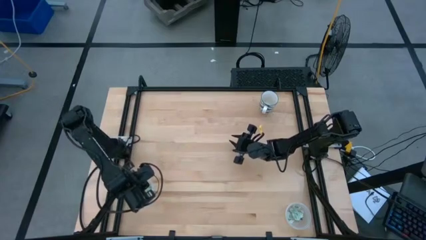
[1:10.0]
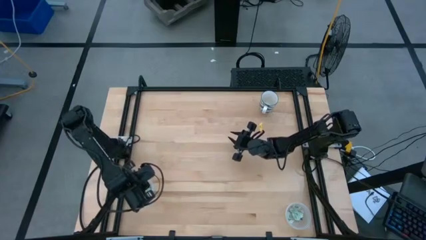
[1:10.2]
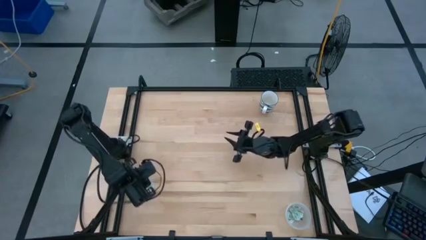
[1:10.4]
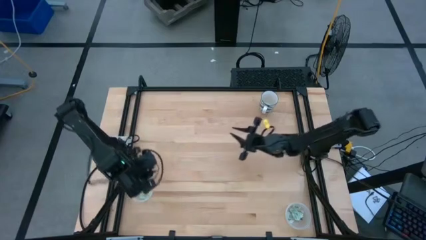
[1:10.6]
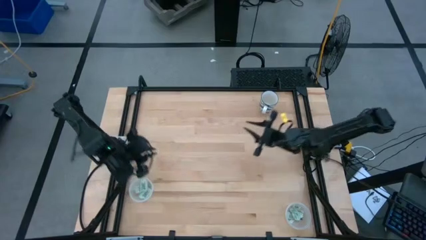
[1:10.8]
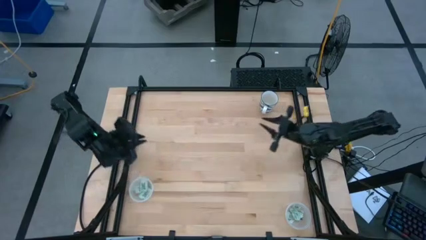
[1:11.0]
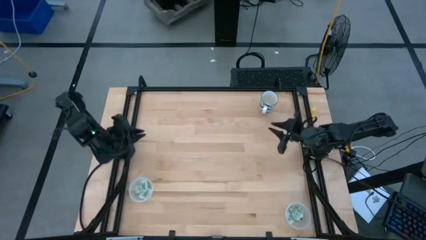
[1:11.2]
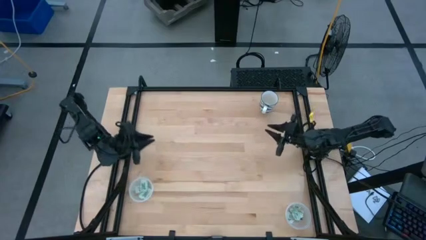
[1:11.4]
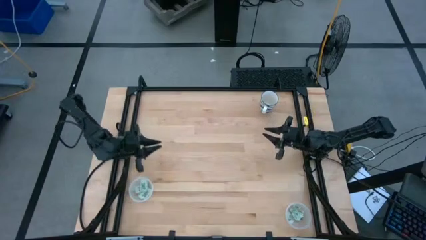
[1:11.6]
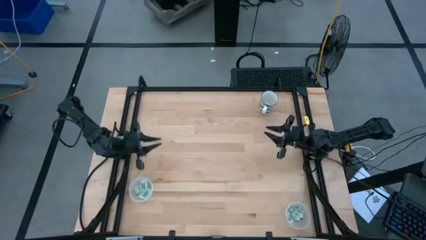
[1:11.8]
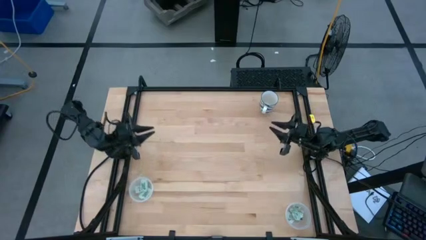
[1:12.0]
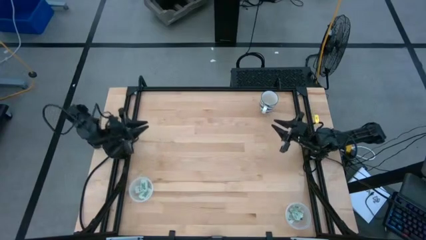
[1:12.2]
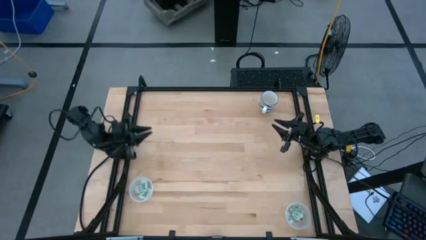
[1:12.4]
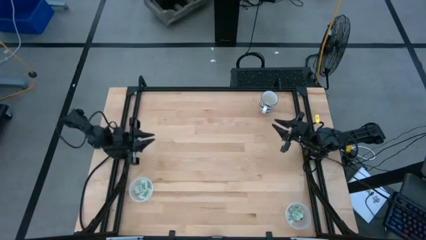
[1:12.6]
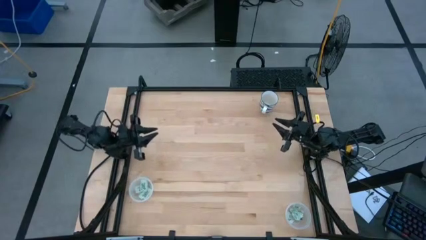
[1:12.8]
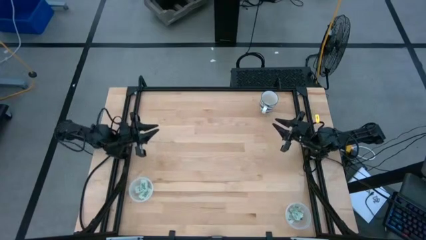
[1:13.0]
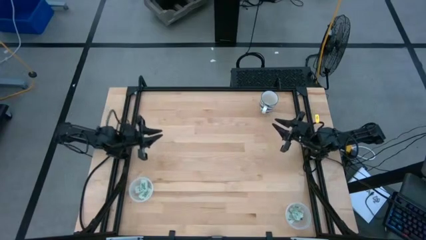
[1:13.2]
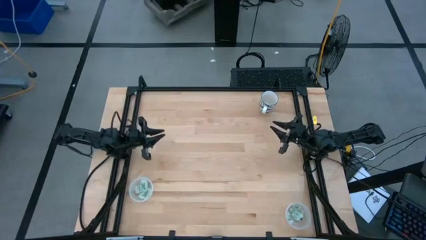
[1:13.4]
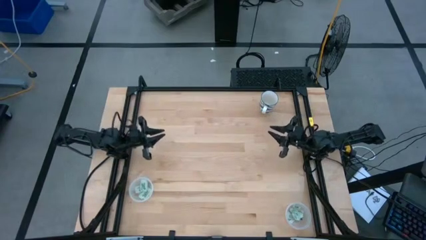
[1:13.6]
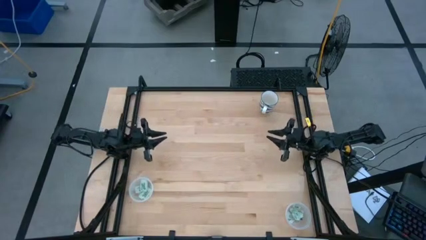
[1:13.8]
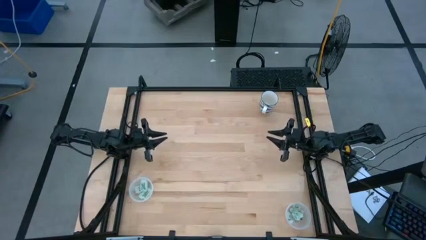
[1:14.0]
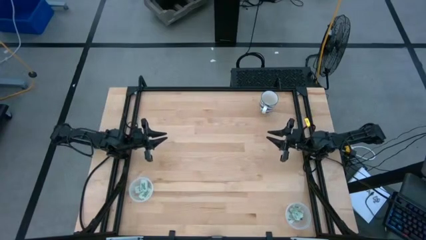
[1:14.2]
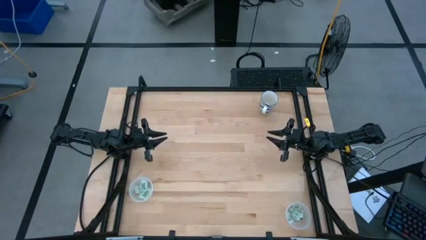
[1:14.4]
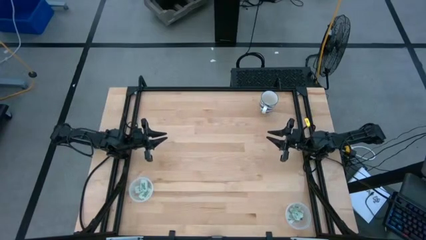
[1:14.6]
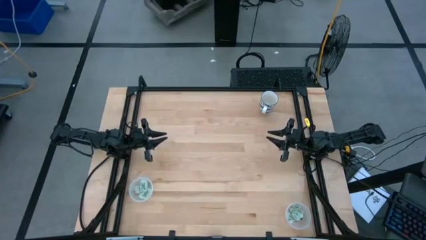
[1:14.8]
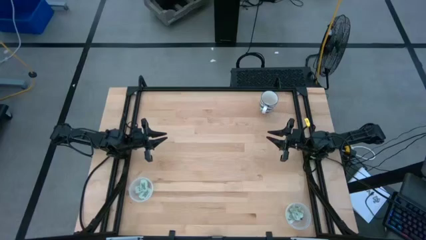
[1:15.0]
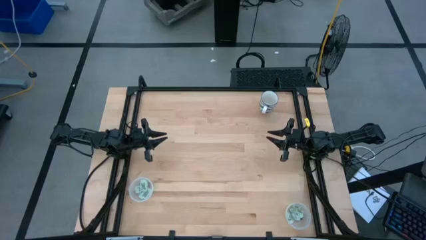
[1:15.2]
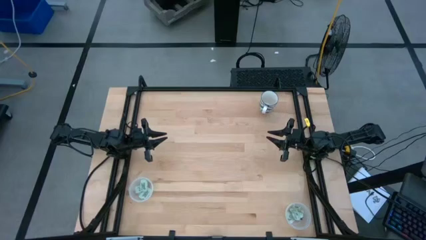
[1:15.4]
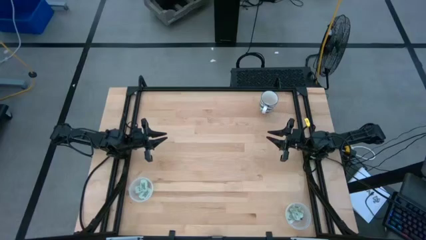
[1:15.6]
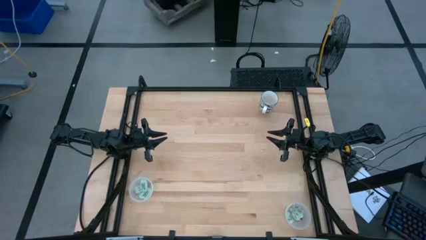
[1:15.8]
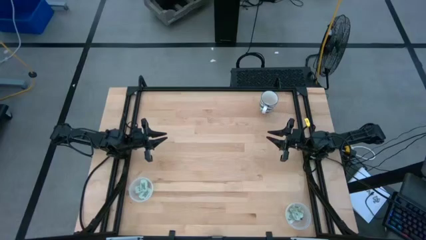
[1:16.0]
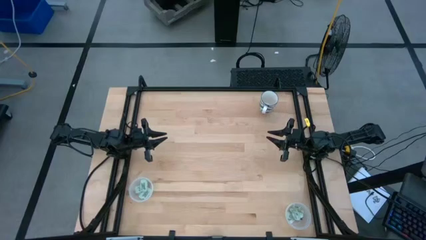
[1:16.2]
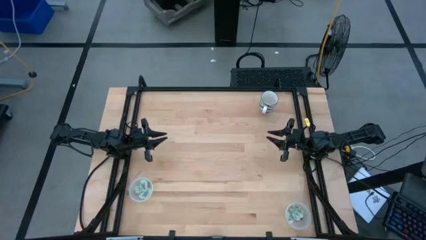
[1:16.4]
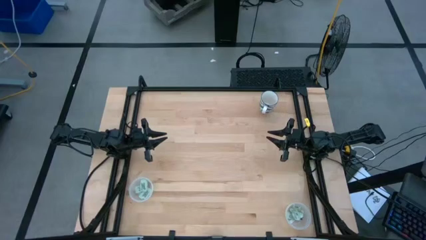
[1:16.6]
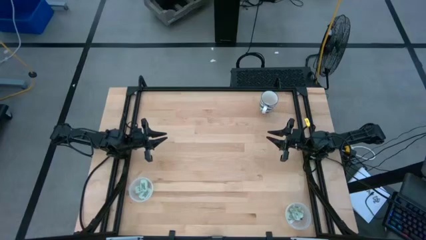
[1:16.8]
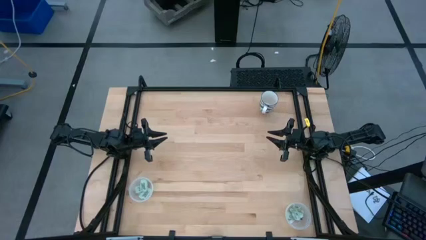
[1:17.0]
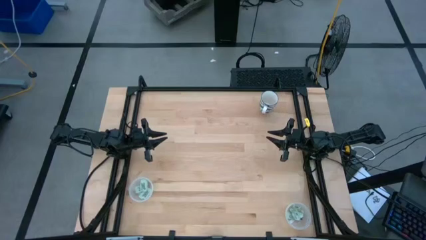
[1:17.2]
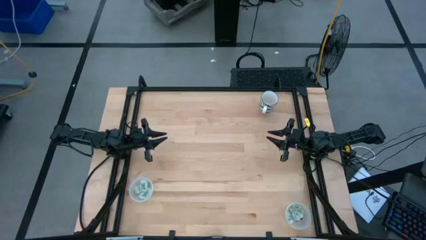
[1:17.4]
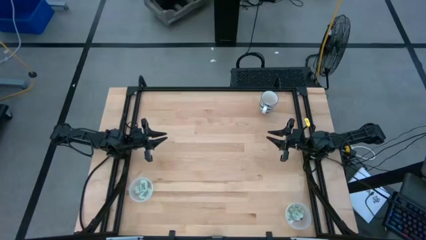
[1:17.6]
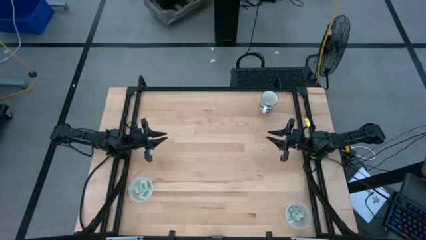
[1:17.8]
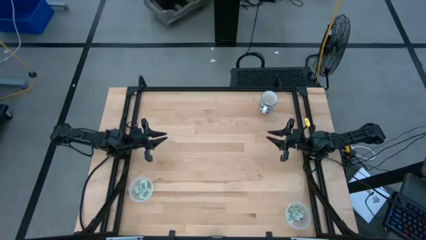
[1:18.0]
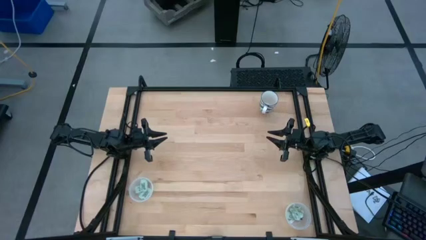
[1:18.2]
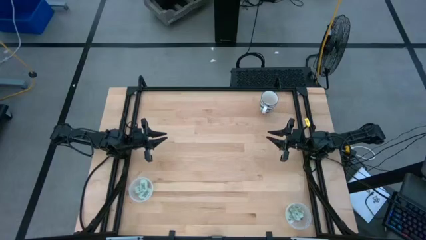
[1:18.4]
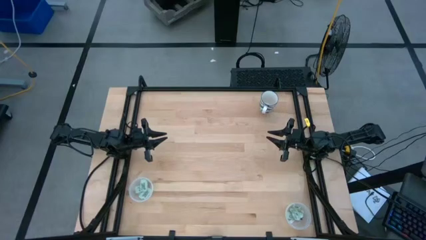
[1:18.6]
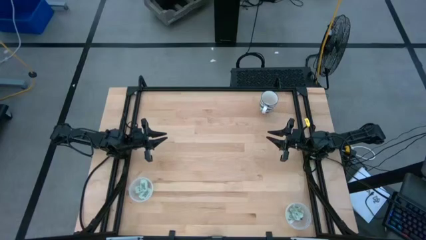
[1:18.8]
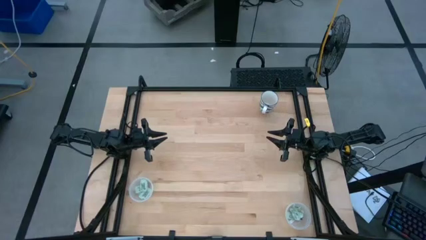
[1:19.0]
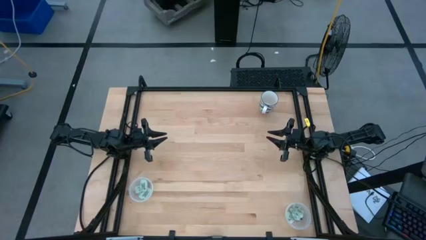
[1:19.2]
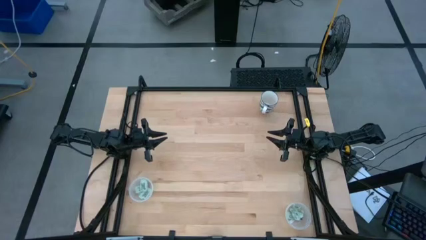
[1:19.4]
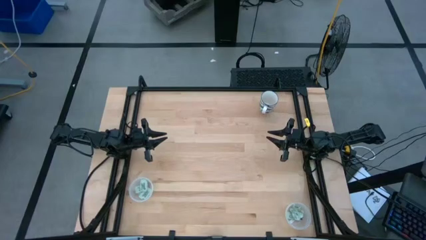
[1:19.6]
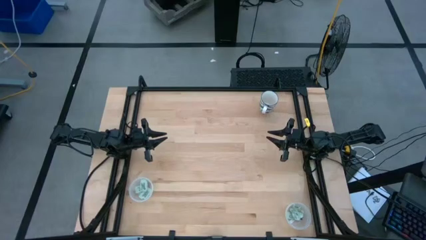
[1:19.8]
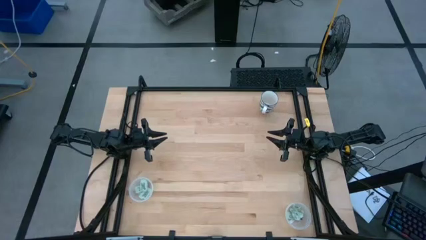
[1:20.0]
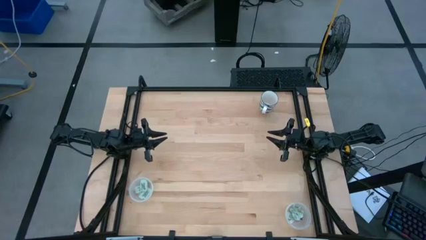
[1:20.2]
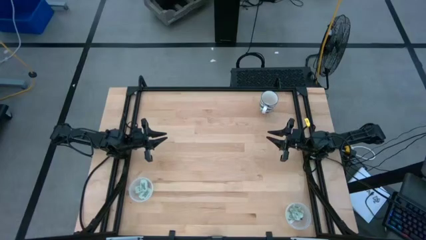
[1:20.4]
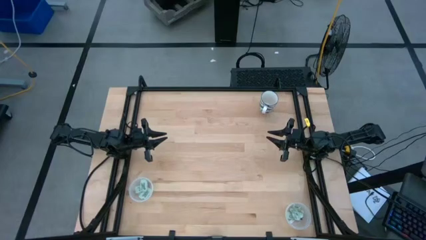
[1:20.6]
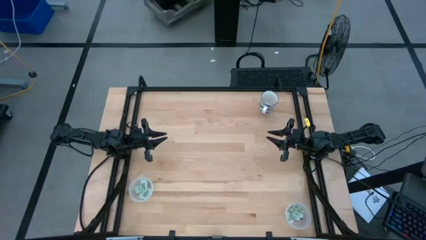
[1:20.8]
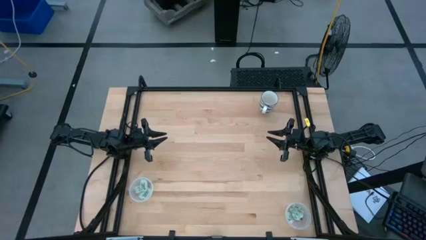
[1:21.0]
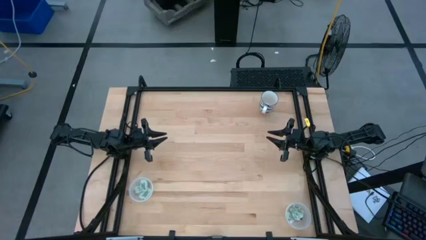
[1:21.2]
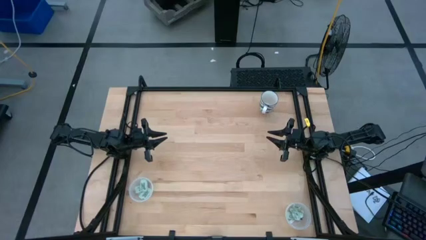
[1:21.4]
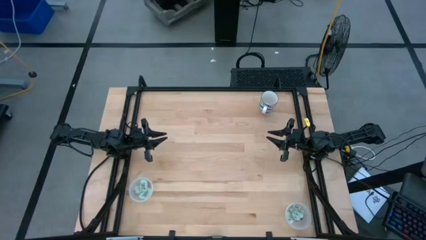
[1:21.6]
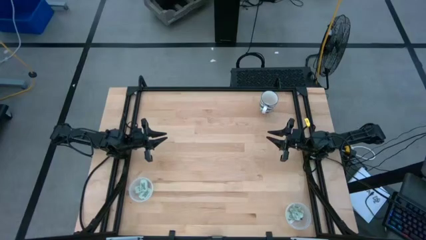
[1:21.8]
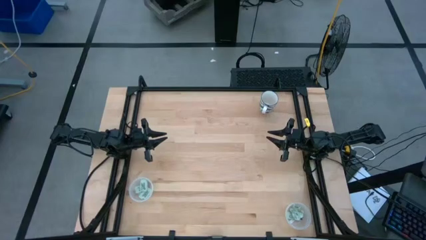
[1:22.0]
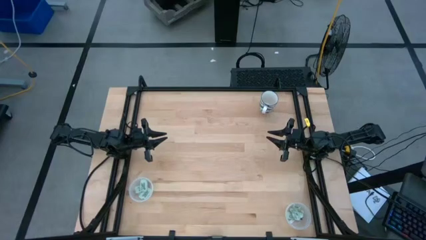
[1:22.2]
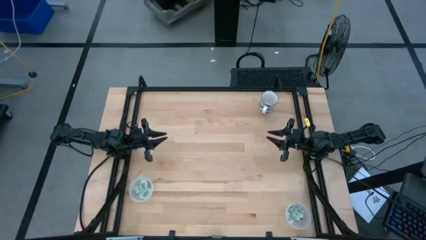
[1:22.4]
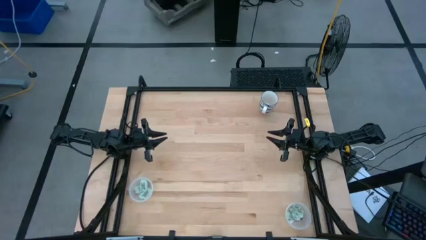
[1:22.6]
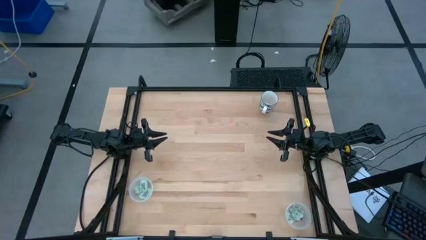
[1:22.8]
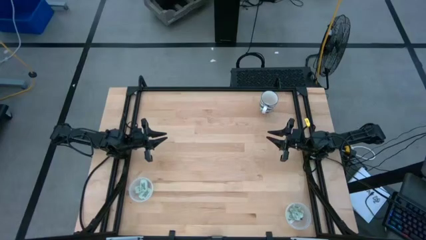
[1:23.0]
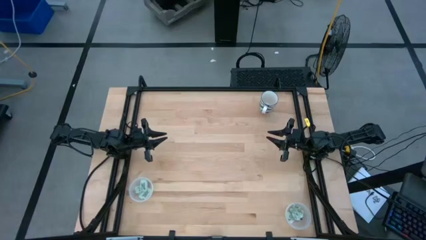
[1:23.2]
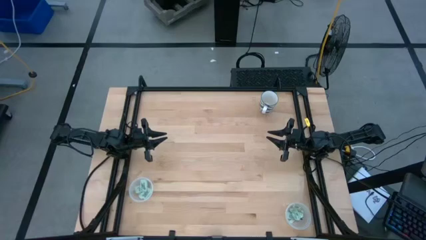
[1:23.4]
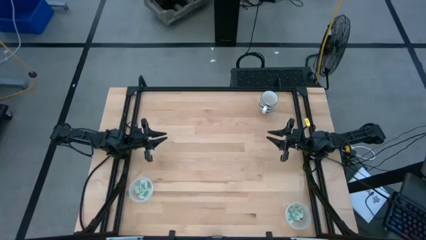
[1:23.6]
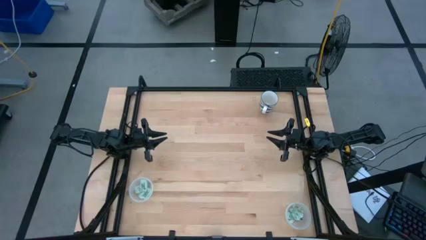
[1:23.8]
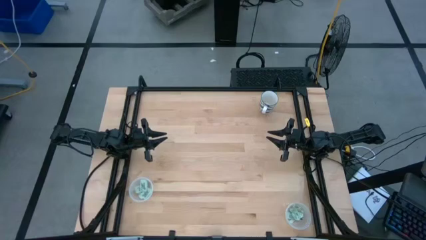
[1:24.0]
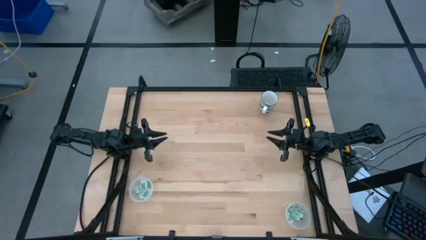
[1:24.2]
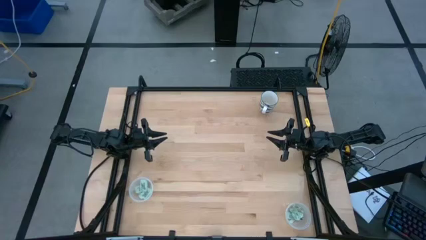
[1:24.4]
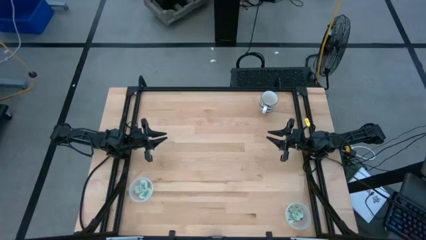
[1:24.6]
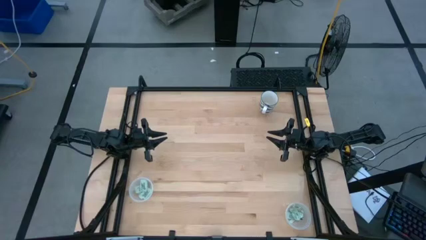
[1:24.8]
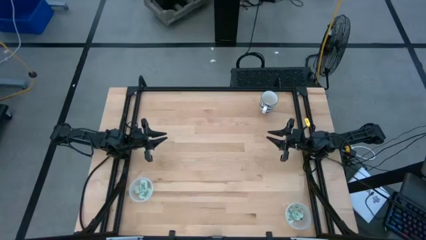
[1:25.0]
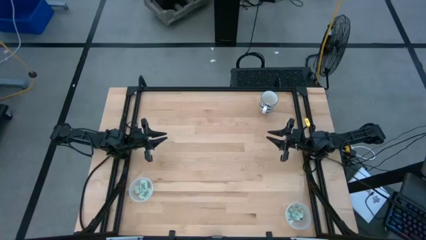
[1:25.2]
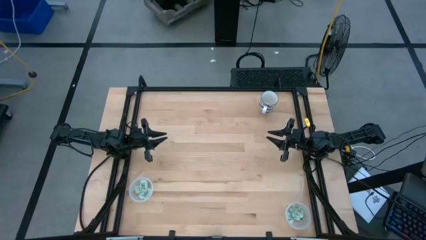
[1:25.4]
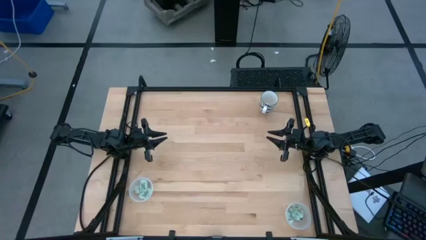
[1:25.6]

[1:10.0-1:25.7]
Task: Pick and place Stevia / Truvia into bins
Return to Home Position
